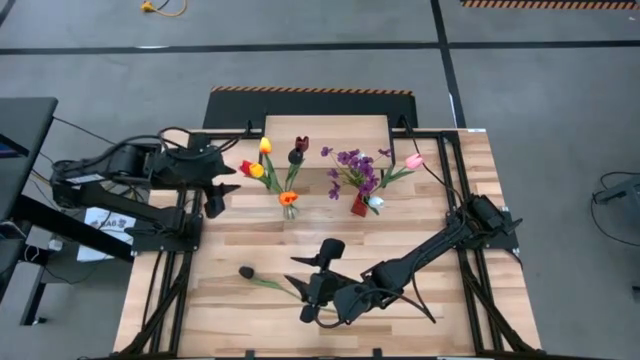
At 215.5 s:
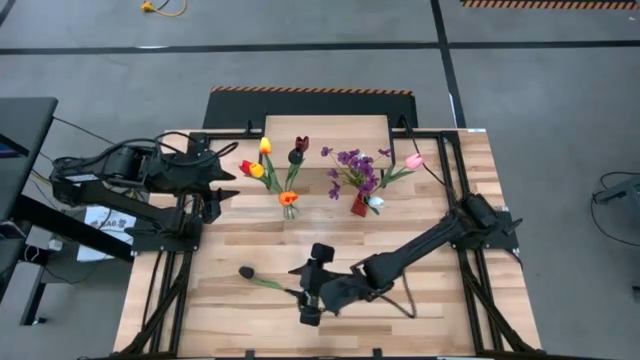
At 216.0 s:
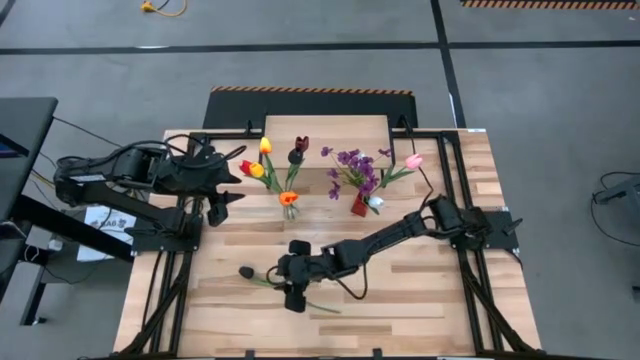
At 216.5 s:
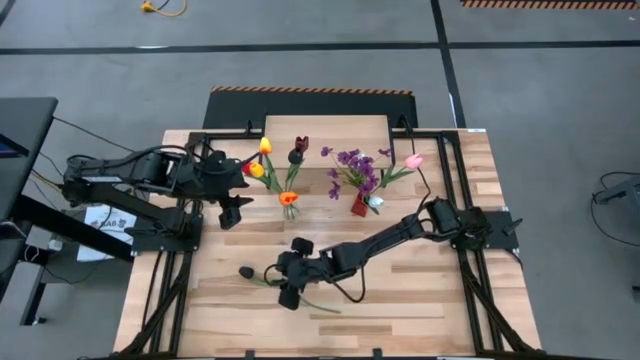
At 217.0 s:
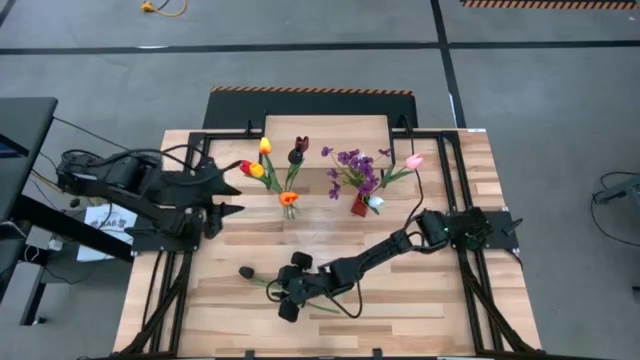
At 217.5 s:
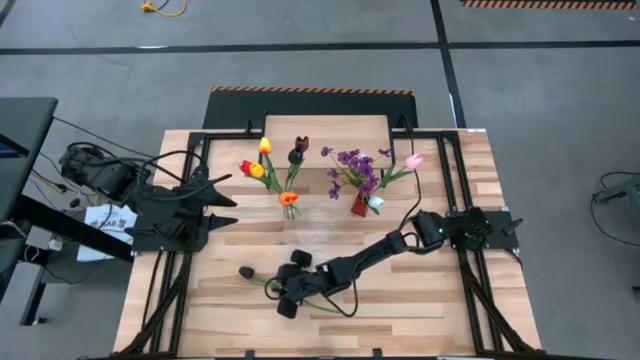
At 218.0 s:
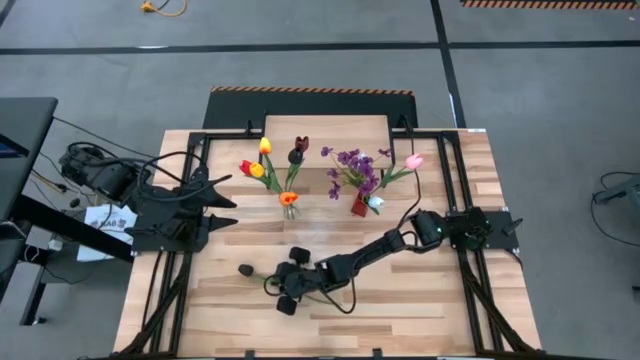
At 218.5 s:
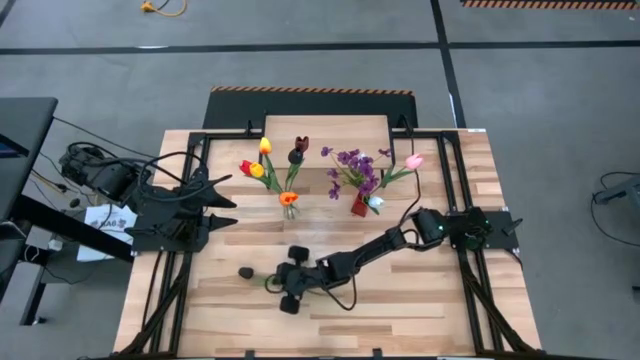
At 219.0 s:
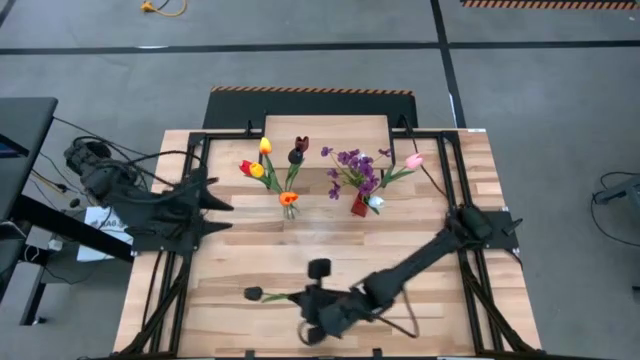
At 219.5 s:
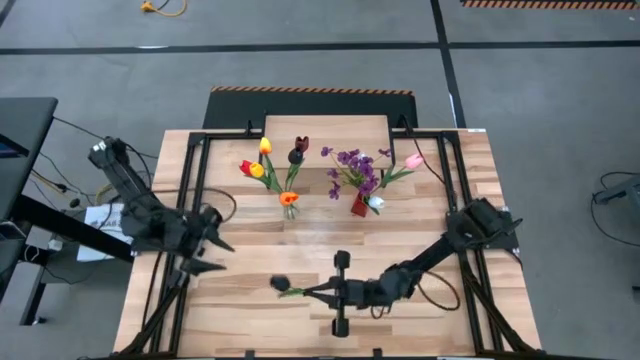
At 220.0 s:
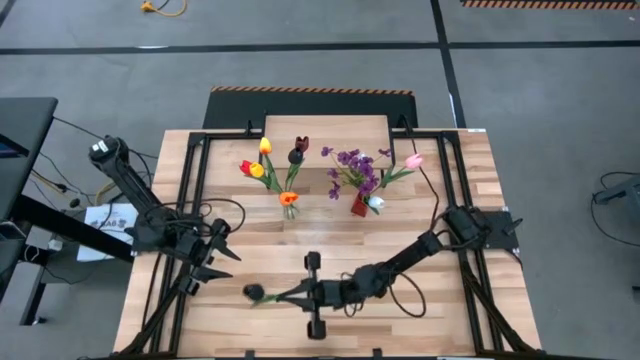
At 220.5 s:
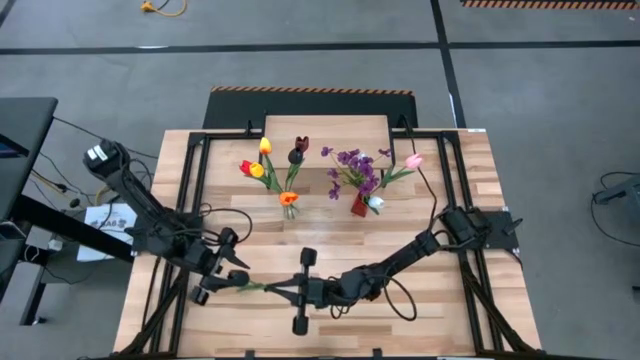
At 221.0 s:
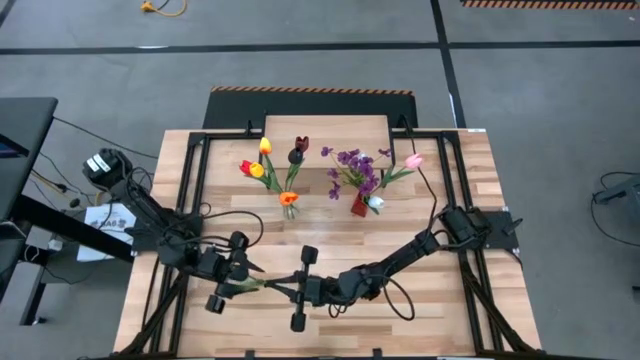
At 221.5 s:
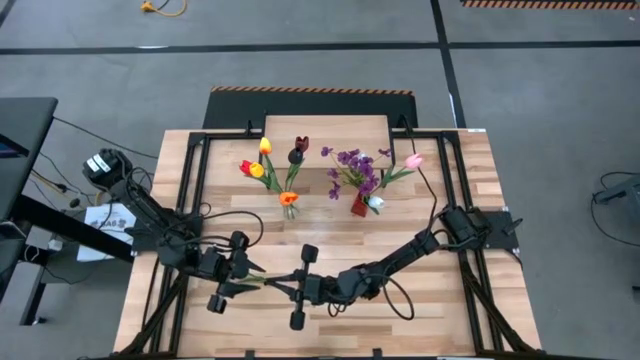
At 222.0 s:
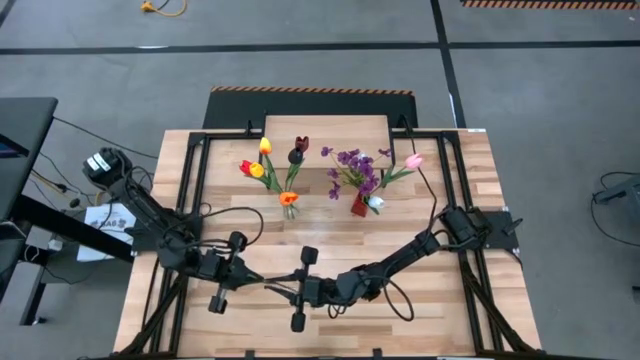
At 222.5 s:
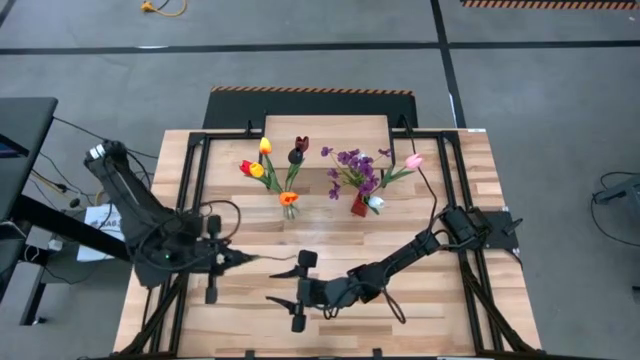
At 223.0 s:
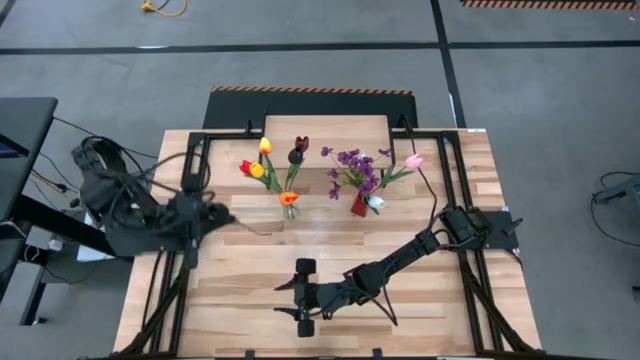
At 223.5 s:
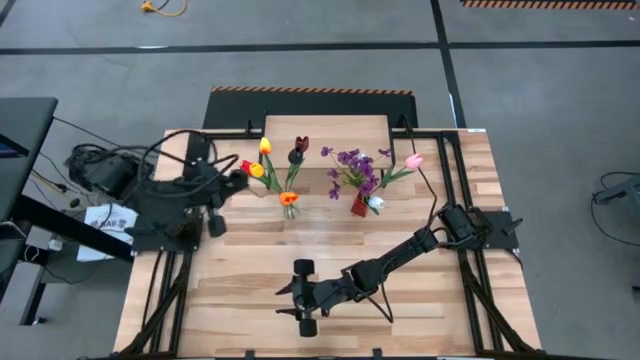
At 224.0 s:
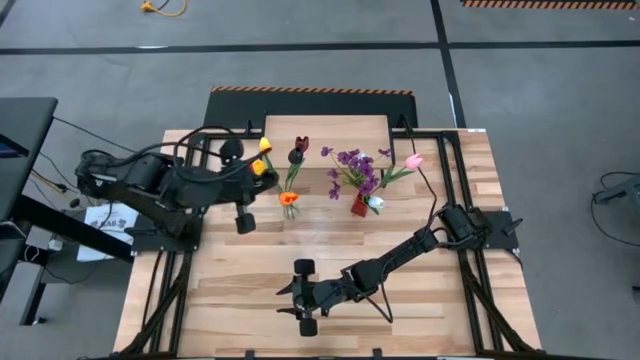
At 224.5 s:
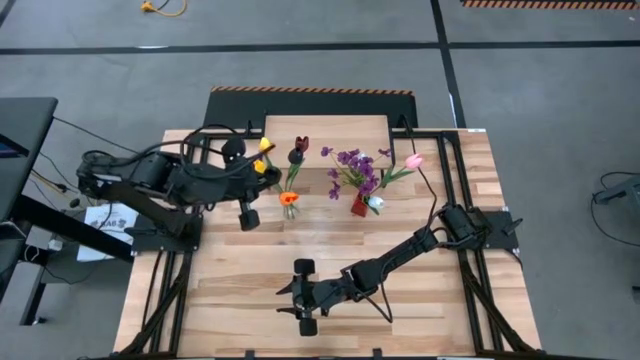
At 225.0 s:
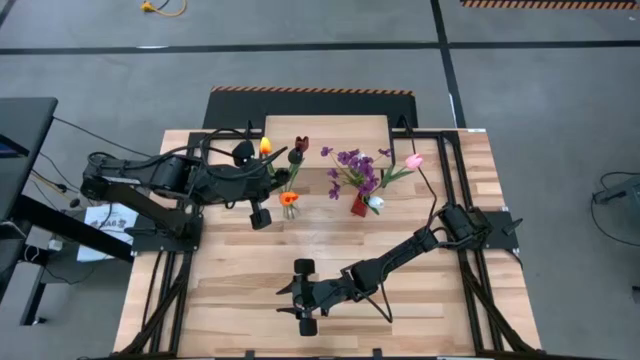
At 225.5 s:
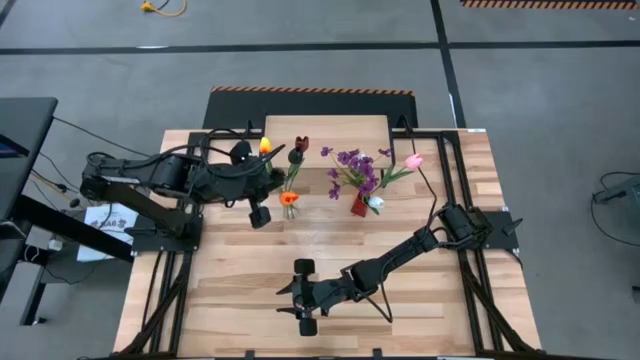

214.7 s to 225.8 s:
Task: Pick and place flowers into a vace then onto a shelf
Put the black flower into the transparent flower vase

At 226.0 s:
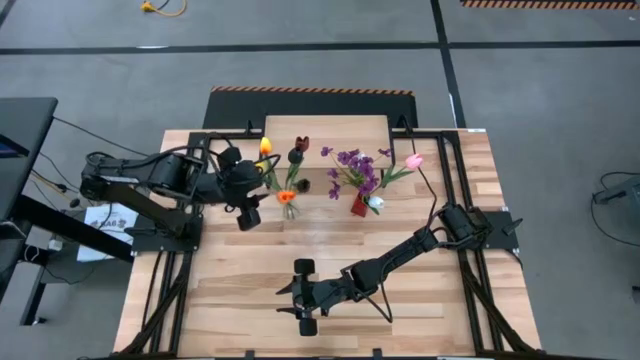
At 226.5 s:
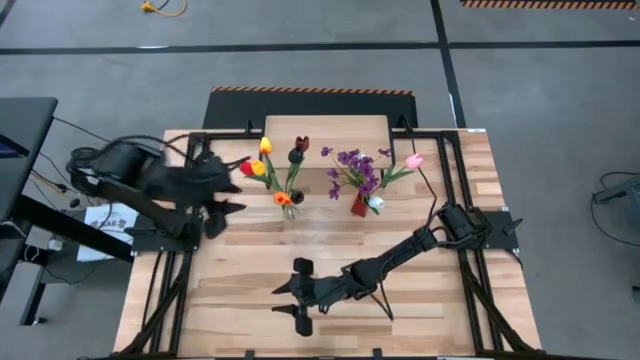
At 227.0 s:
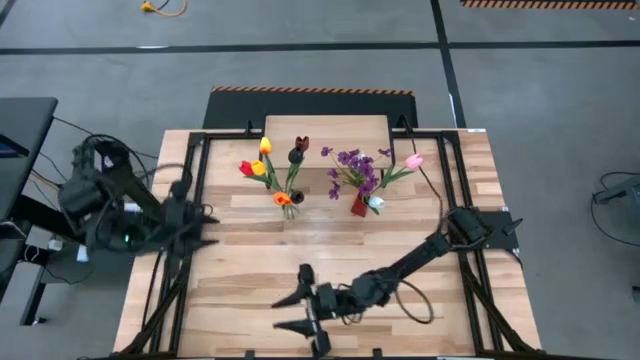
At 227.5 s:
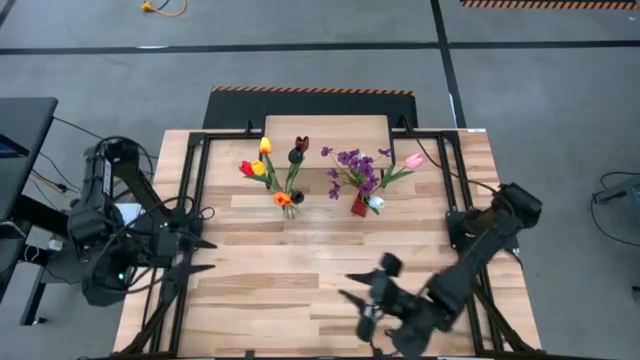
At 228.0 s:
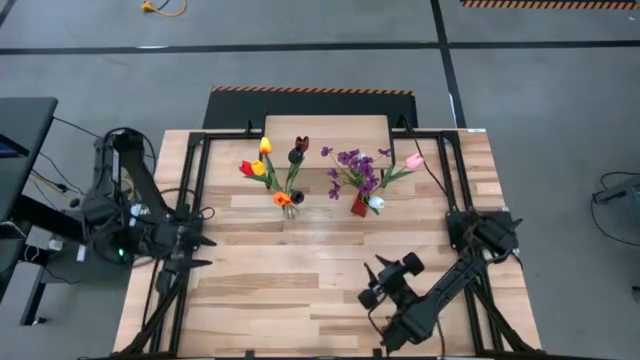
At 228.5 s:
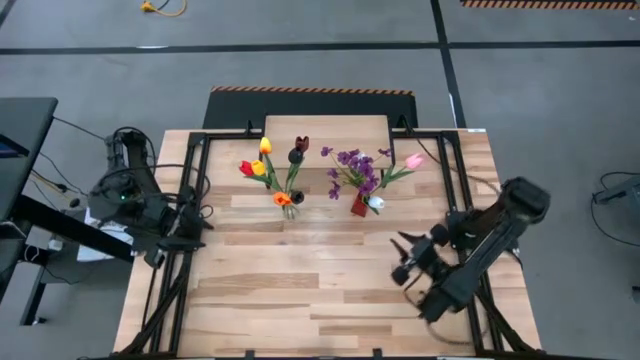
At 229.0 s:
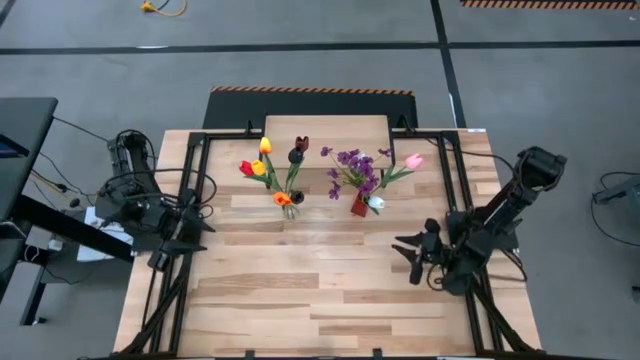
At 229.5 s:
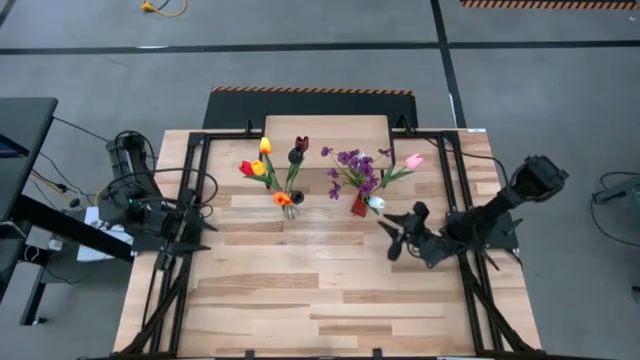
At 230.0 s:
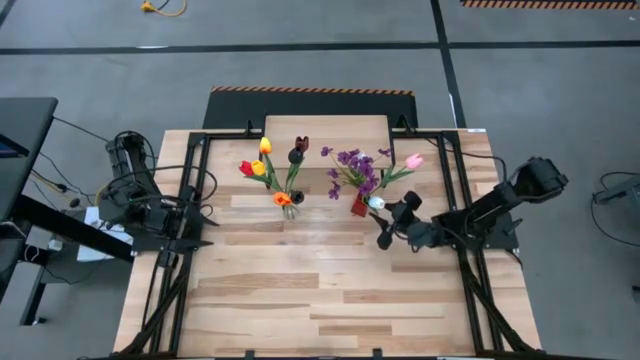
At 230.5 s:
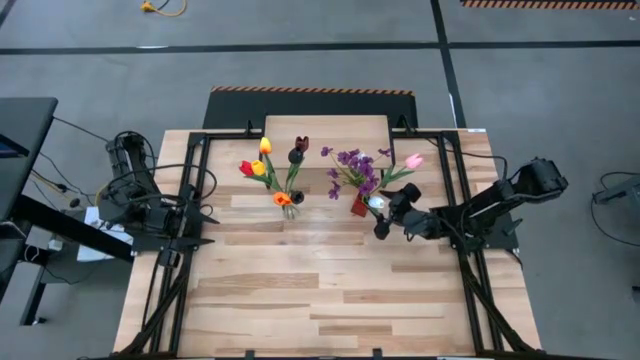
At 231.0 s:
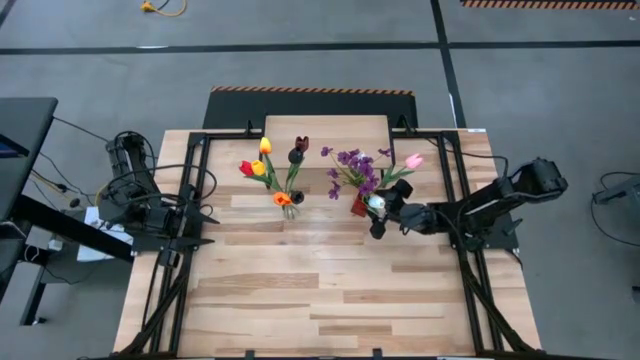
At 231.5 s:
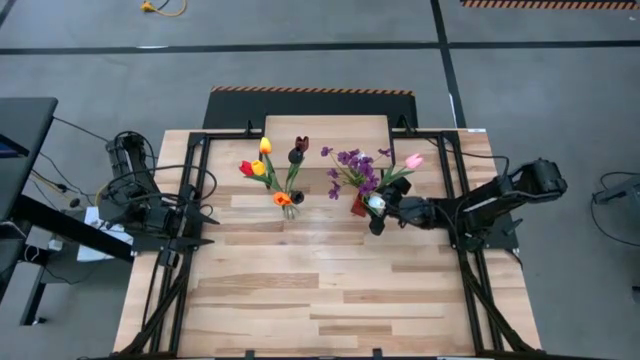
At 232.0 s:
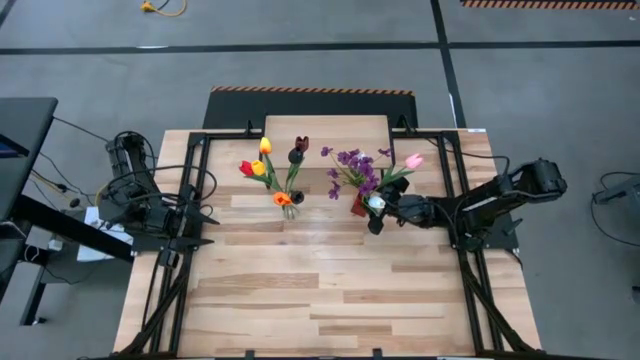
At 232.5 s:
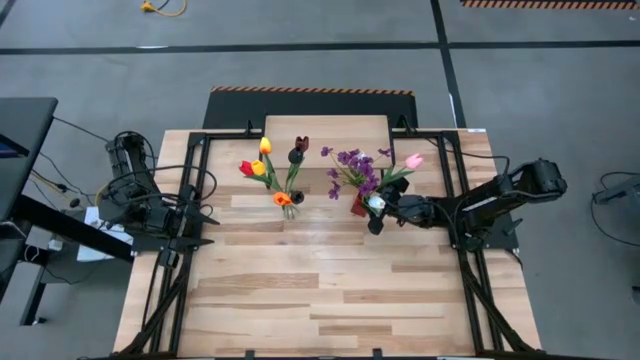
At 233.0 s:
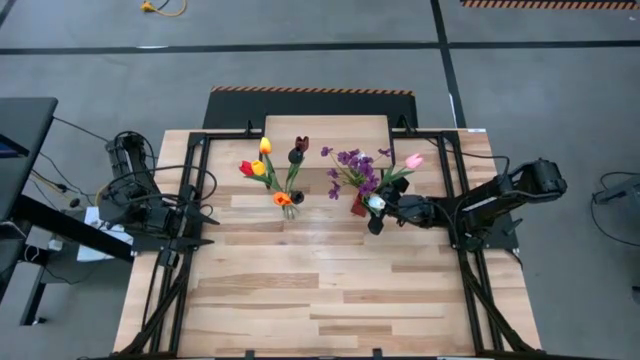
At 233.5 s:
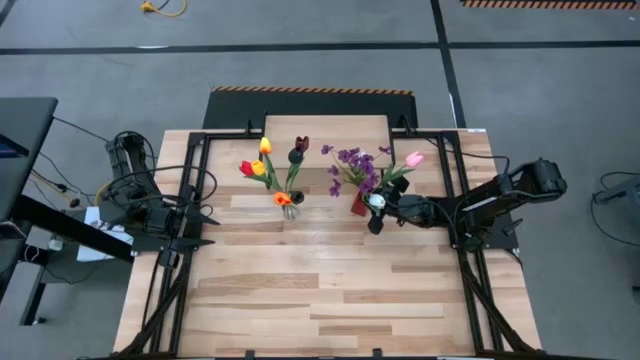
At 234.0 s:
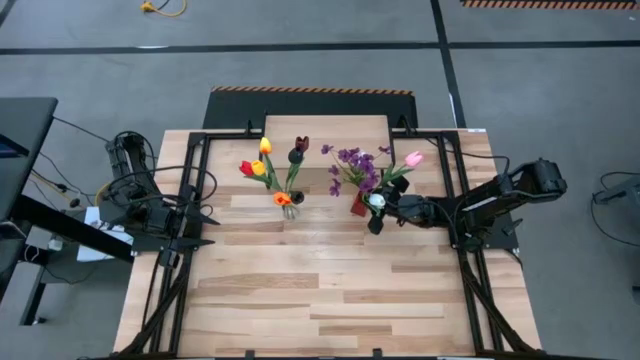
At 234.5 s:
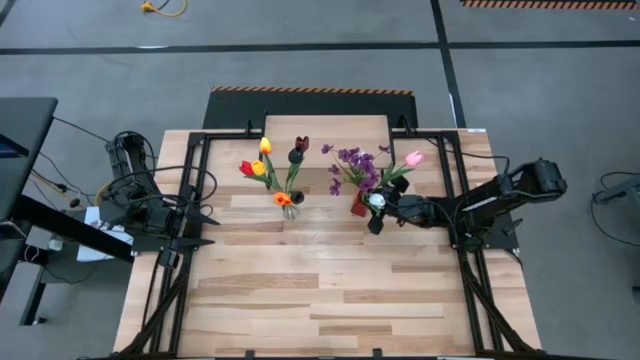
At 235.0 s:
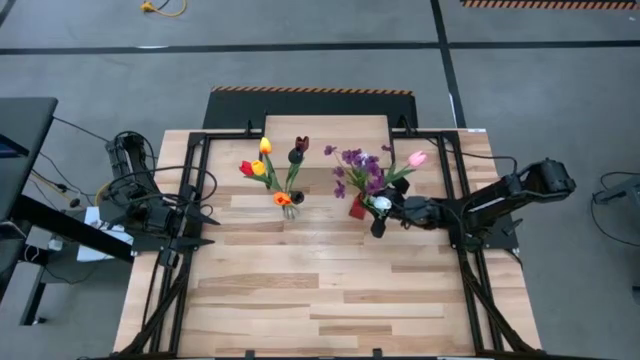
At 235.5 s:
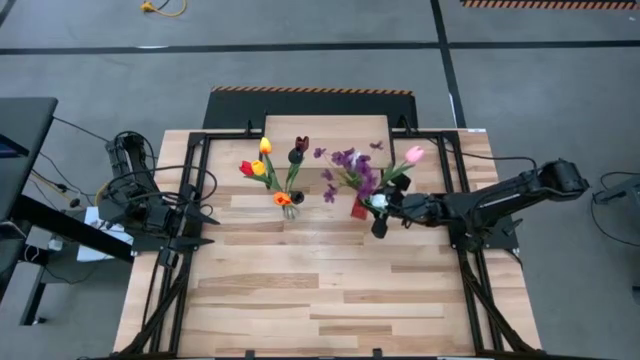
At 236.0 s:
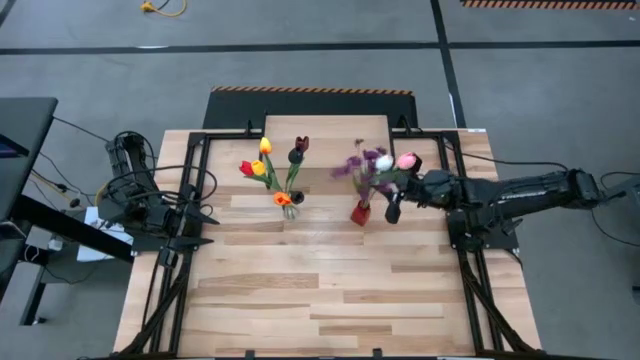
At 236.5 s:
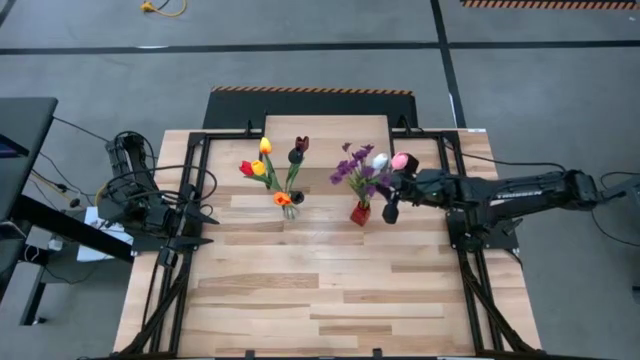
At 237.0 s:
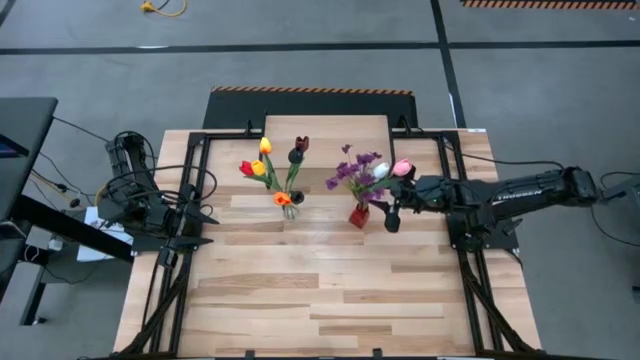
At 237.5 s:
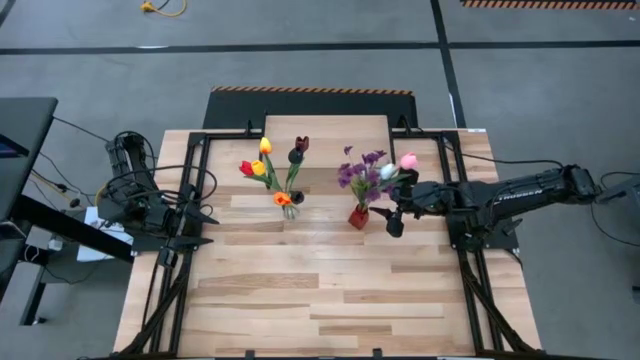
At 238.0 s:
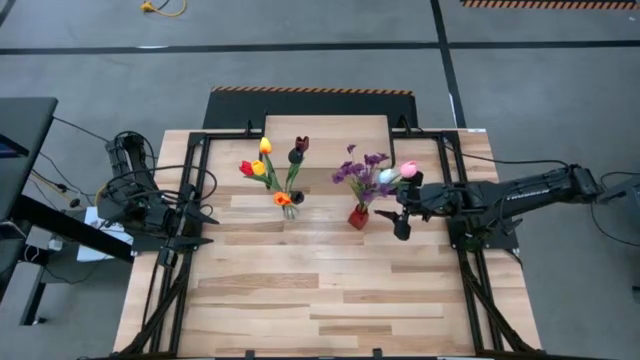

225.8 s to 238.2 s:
Put the red flower vase with the flowers on the shelf
